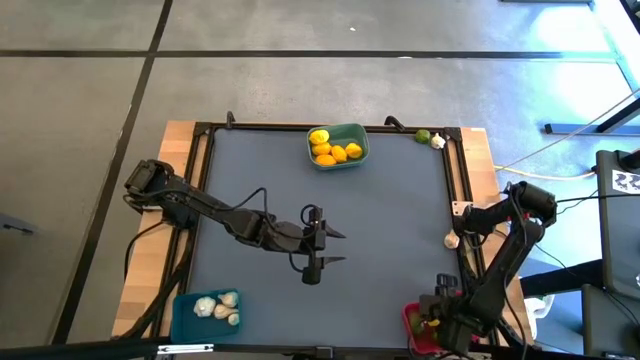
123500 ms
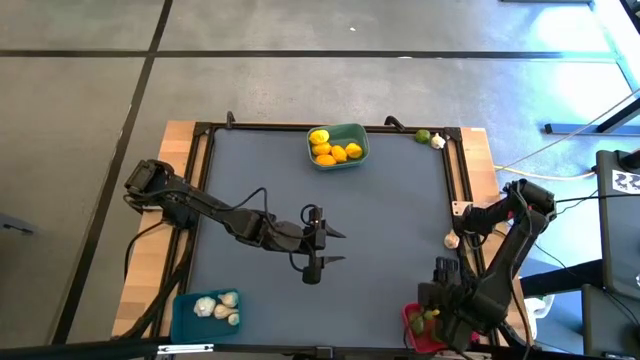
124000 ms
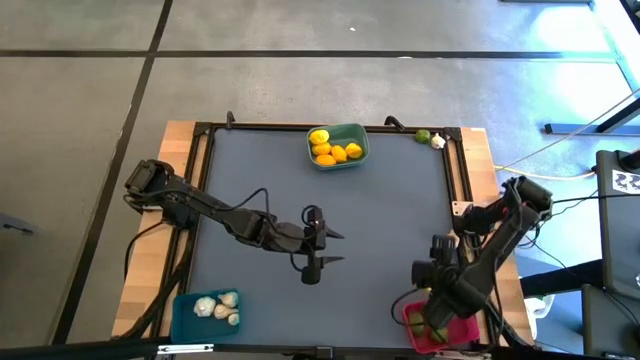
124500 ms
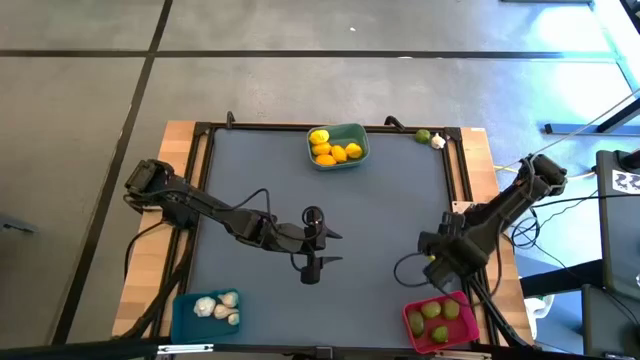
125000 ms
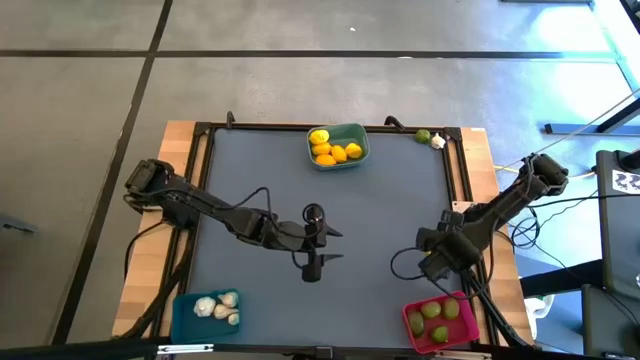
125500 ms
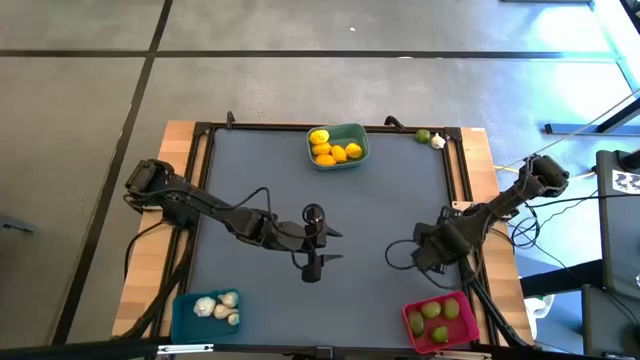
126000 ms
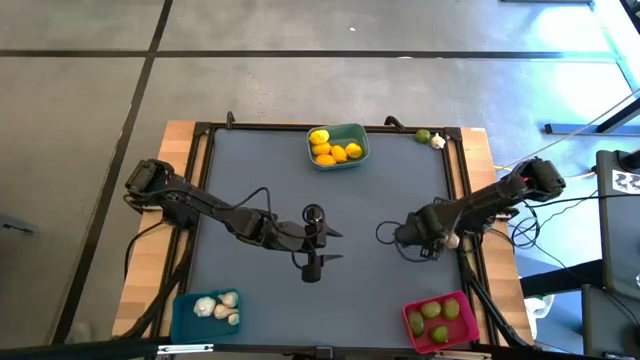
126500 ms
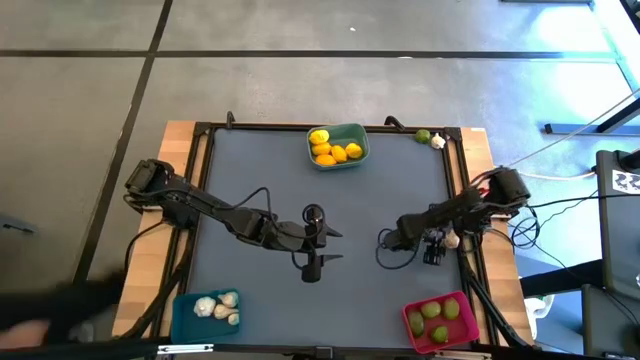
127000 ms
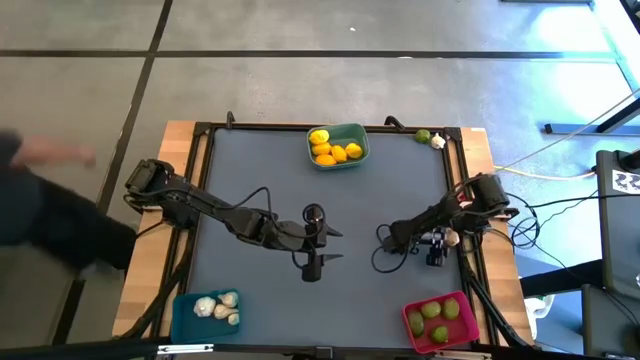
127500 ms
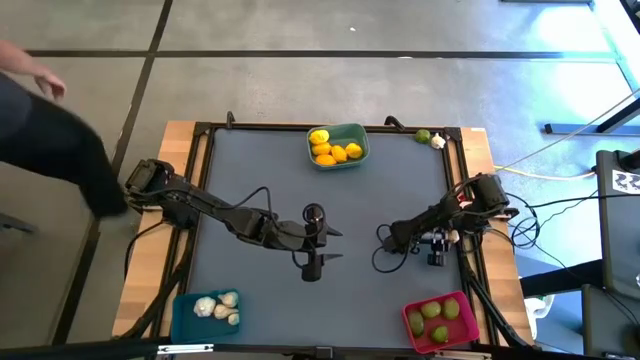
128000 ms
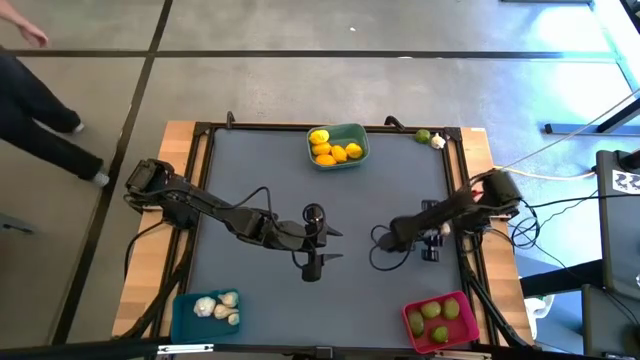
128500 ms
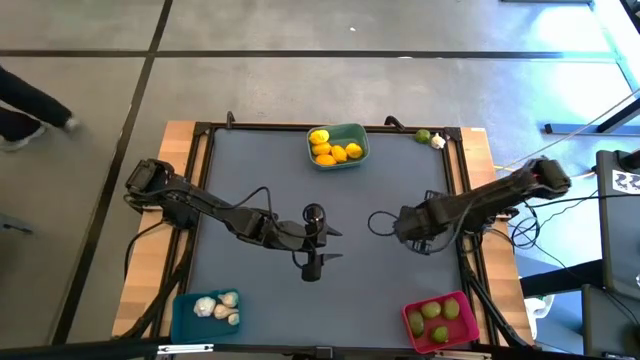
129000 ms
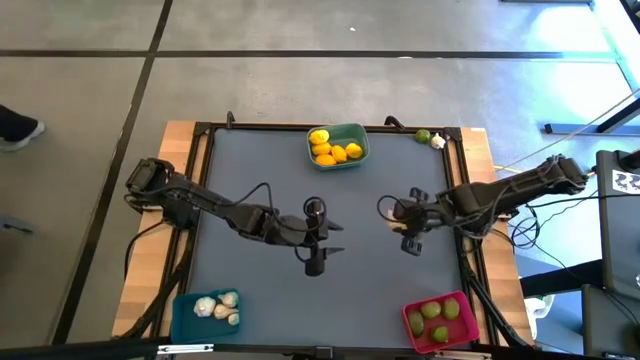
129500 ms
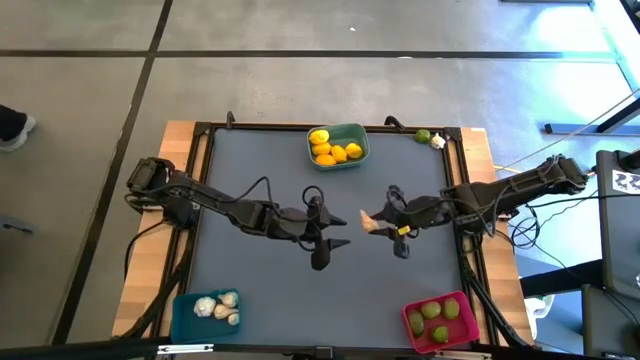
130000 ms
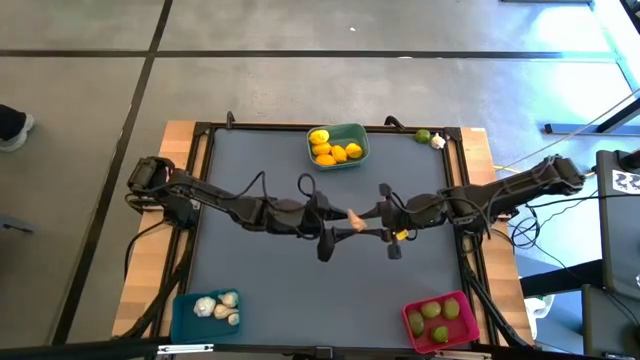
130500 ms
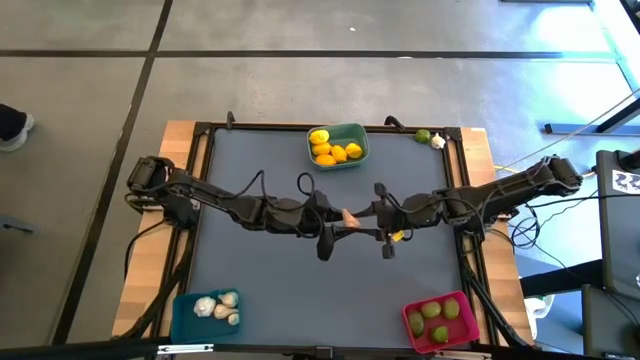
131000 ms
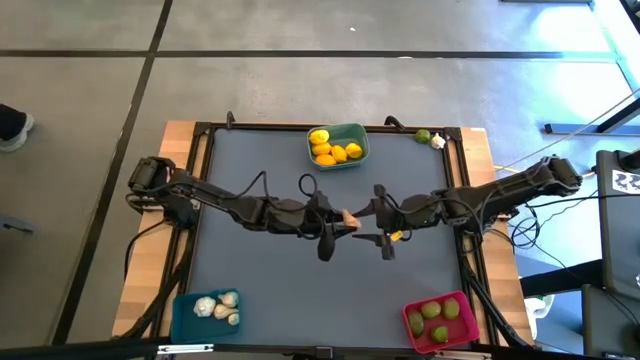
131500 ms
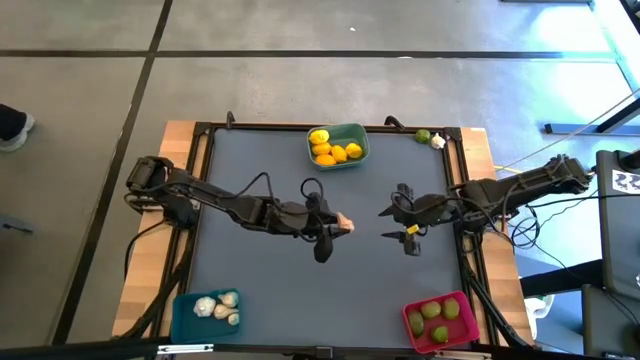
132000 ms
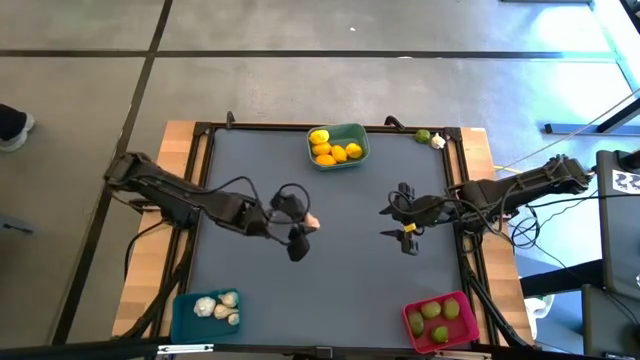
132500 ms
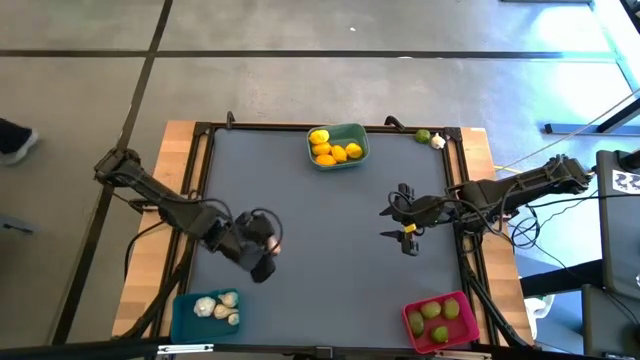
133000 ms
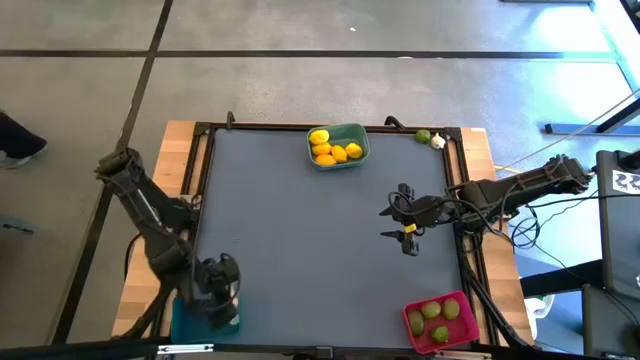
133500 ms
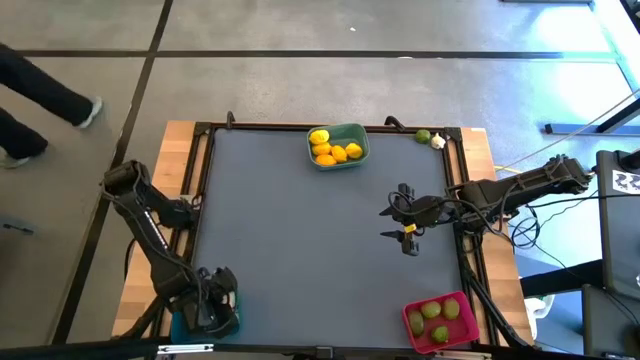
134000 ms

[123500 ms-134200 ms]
Task: Sort produce into baskets
Put the white garlic into the blue bin

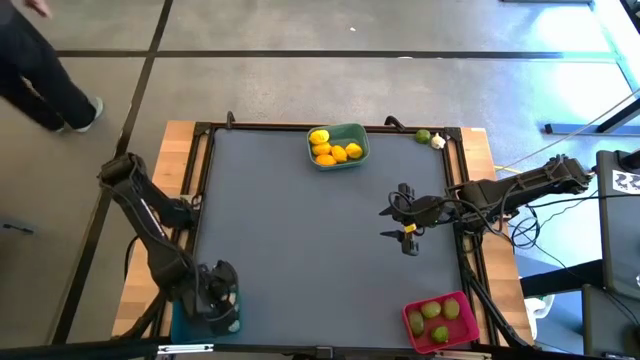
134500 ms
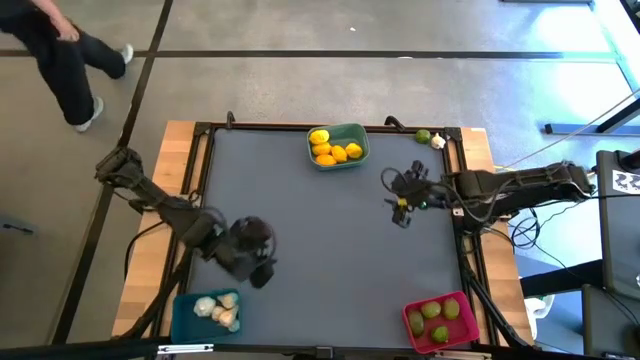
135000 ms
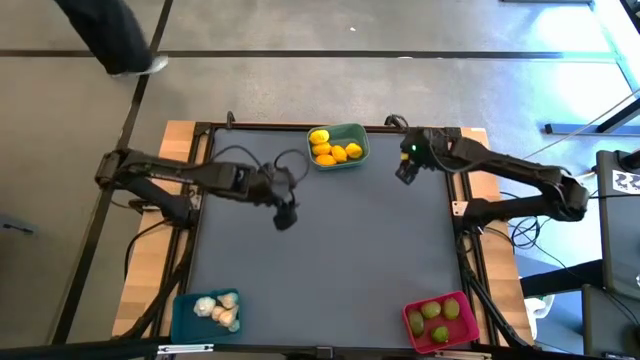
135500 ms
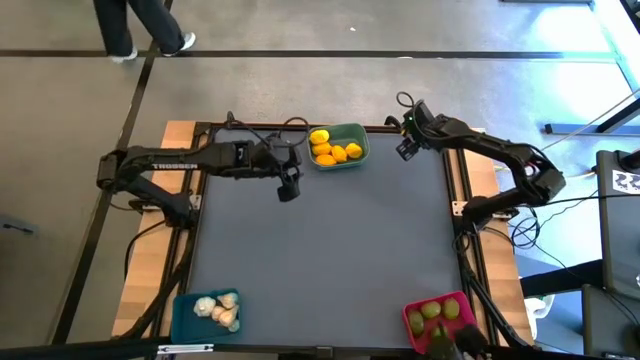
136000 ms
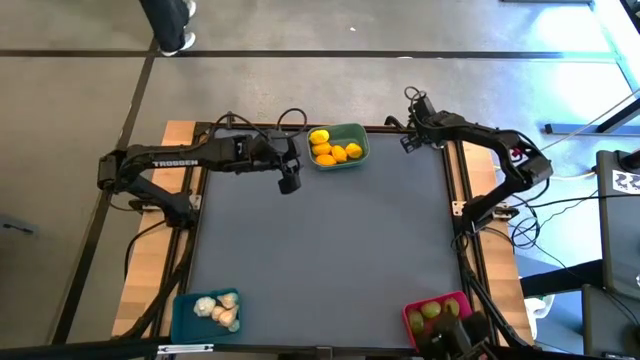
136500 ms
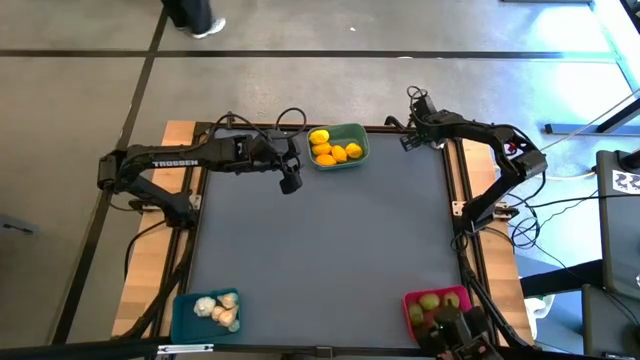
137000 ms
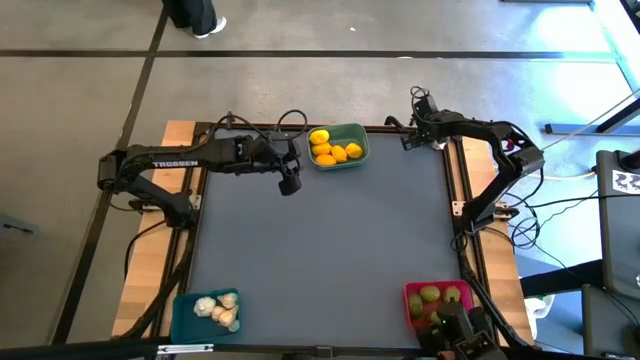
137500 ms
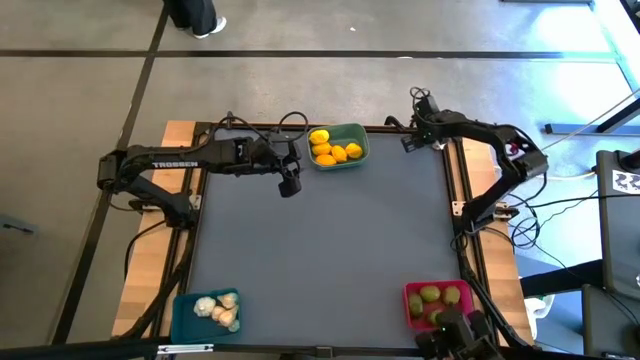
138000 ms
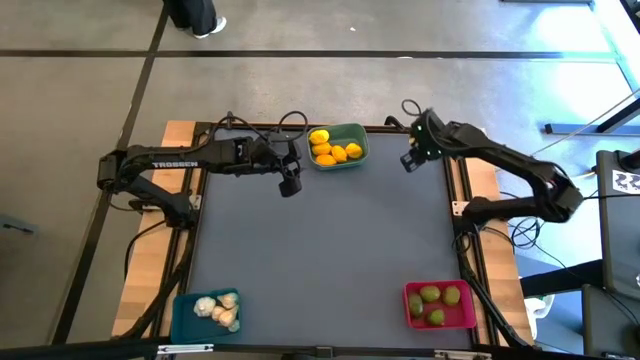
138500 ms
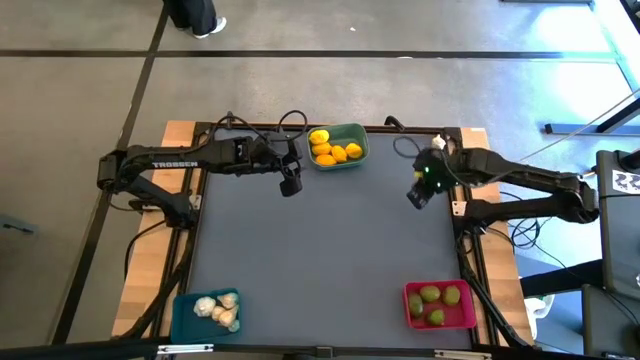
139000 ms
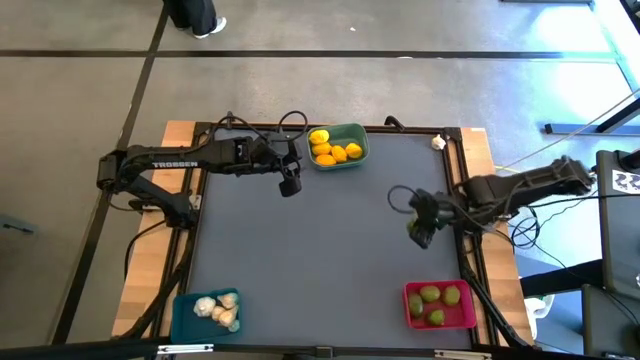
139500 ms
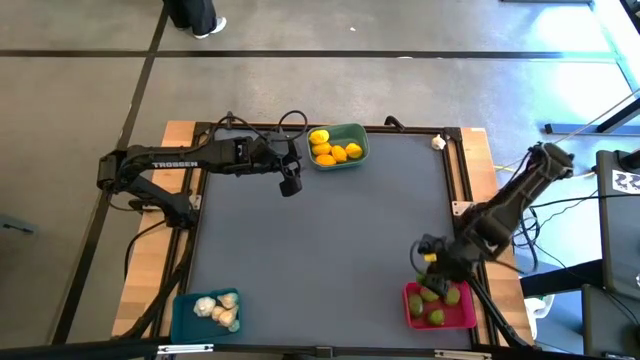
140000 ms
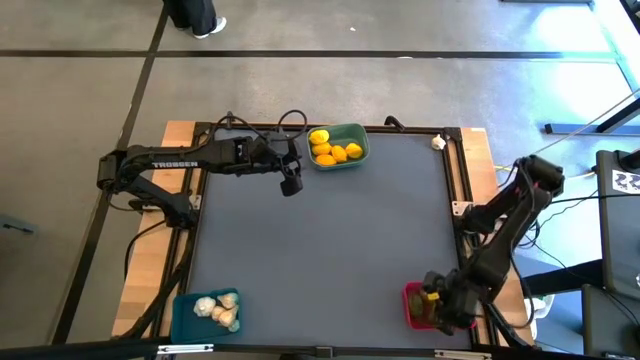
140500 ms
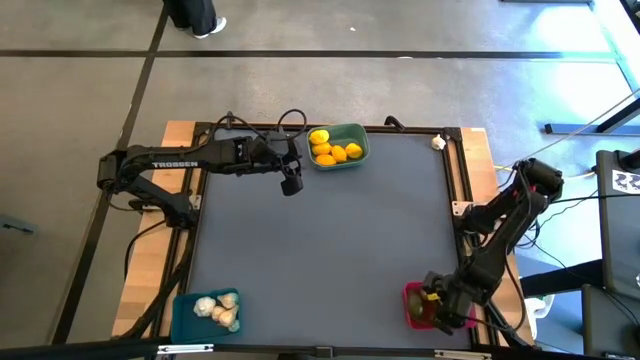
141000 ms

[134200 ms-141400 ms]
Put the green lime into the pink bin

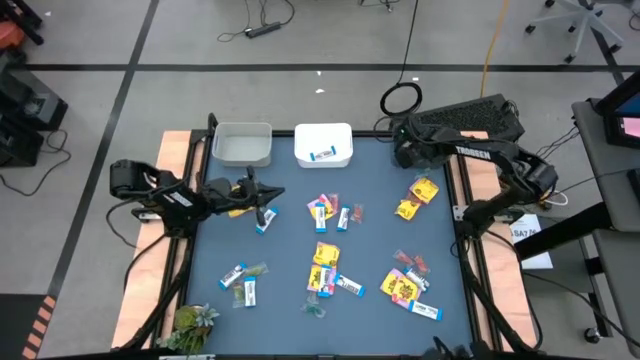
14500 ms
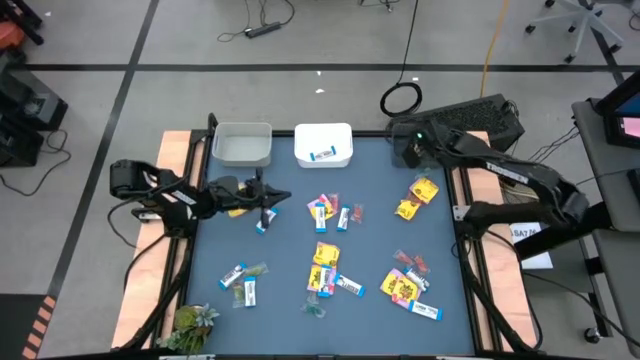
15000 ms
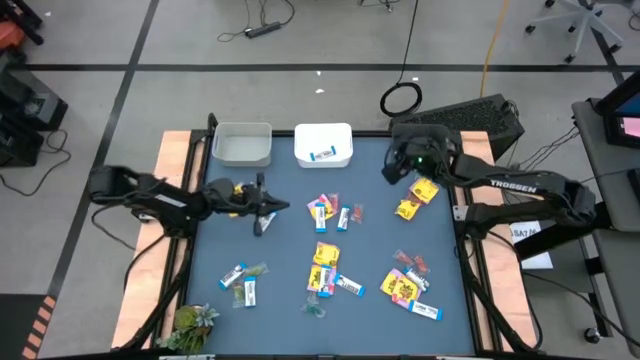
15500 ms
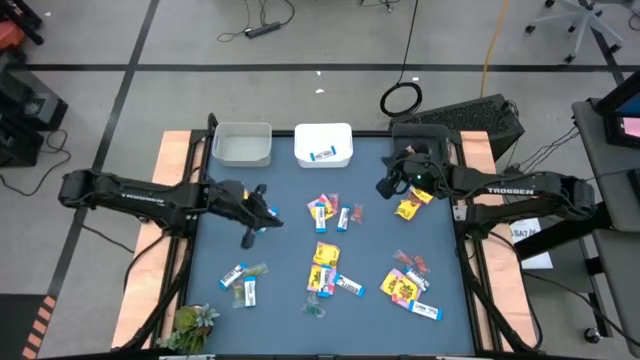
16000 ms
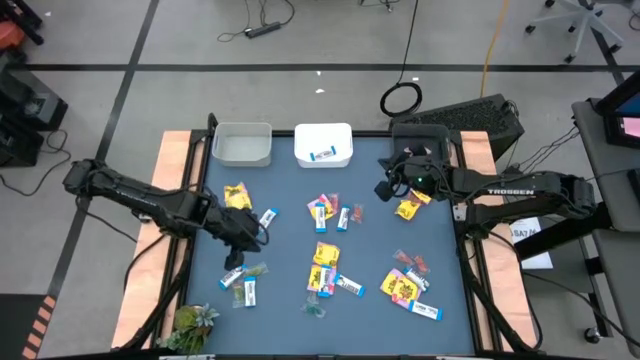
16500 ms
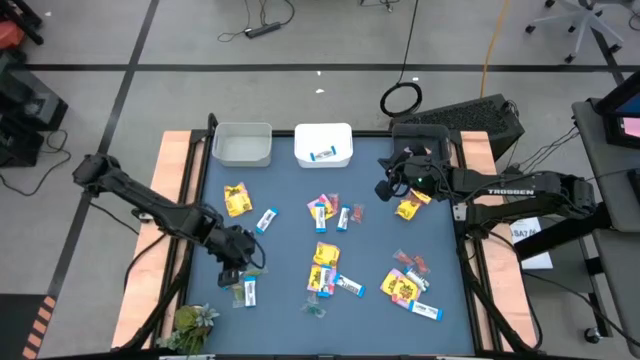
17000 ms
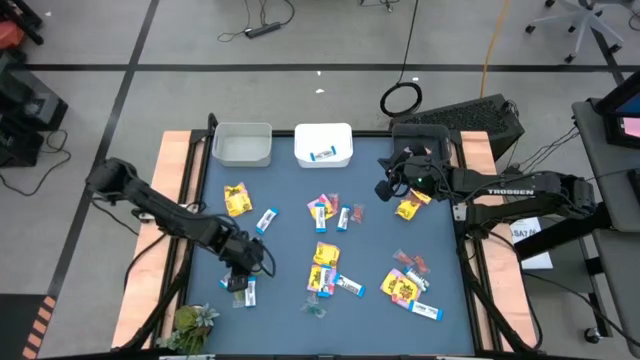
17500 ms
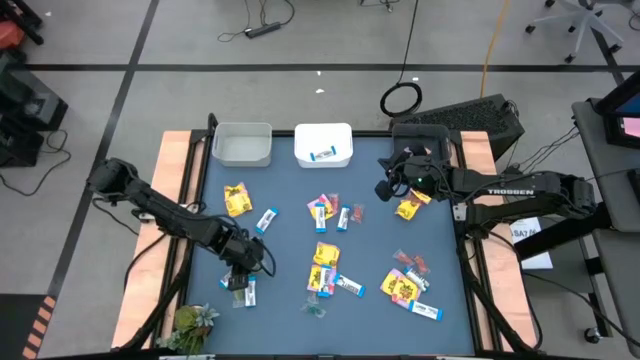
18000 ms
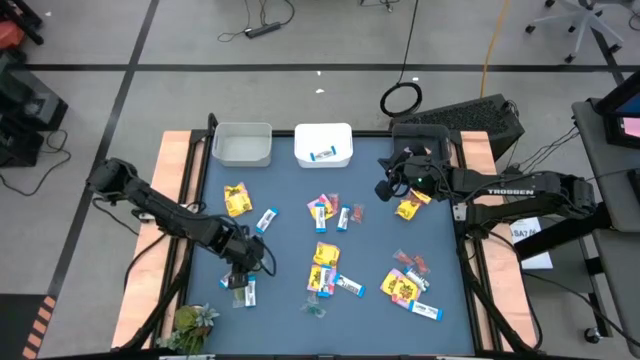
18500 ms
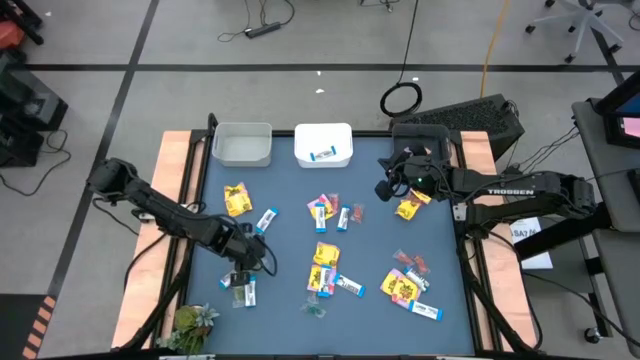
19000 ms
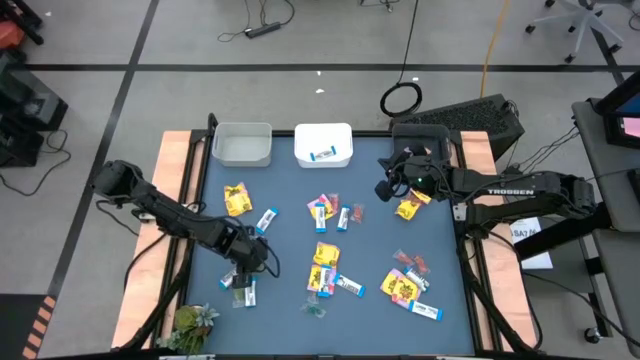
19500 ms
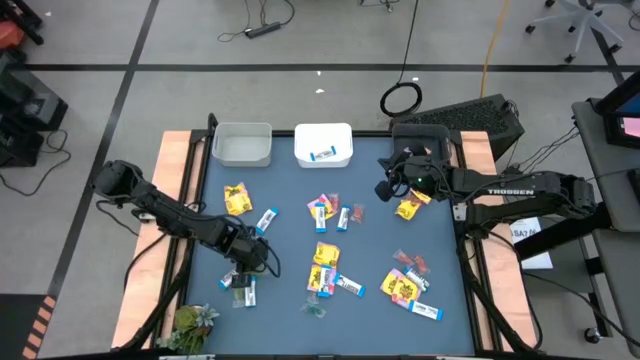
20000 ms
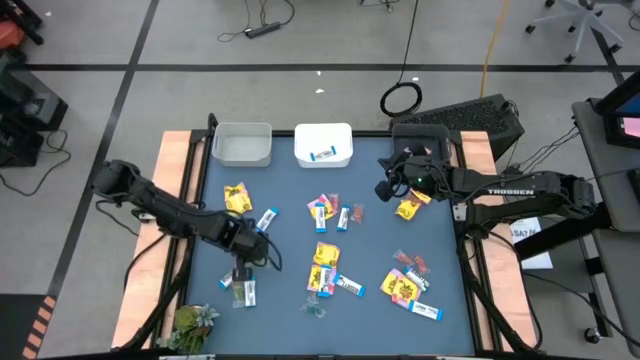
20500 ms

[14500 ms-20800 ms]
Task: Sort candy
Put the green gummy into the gray bin
